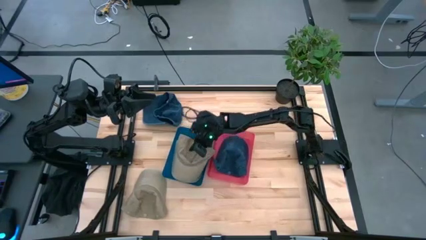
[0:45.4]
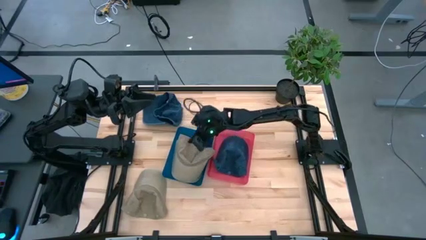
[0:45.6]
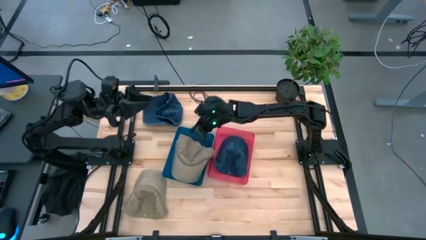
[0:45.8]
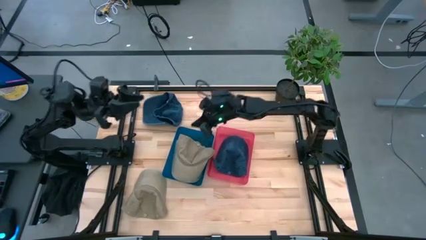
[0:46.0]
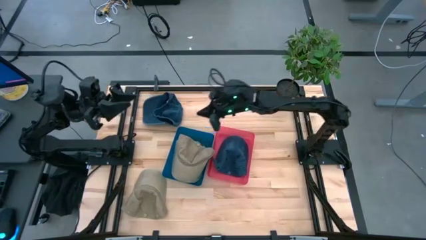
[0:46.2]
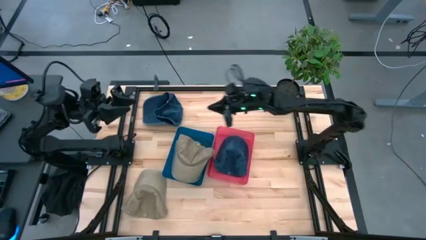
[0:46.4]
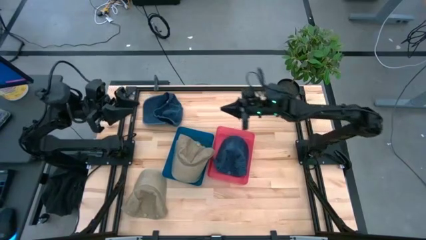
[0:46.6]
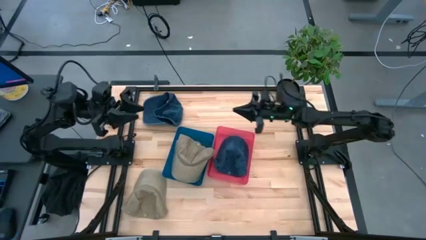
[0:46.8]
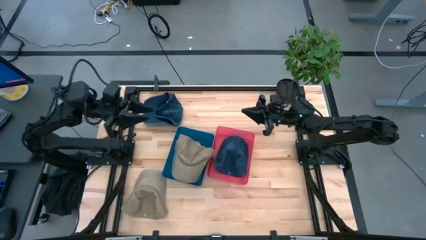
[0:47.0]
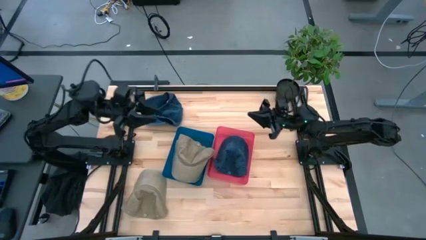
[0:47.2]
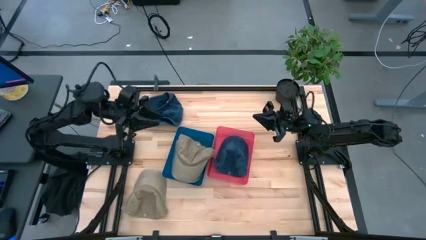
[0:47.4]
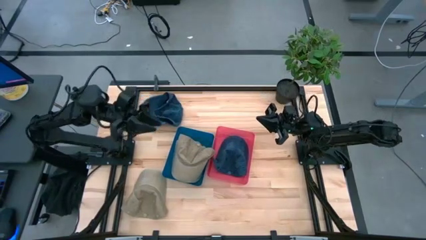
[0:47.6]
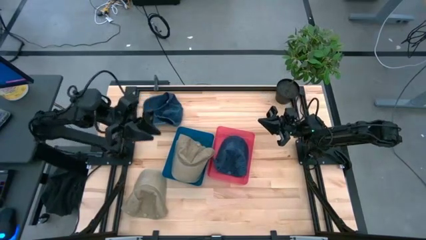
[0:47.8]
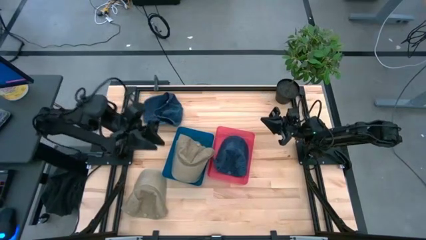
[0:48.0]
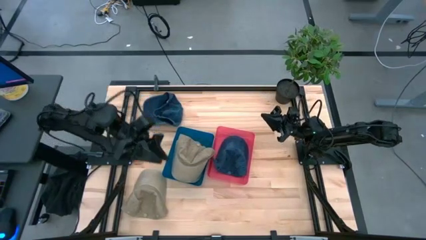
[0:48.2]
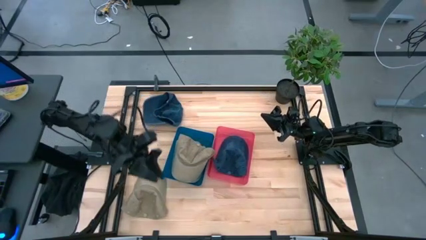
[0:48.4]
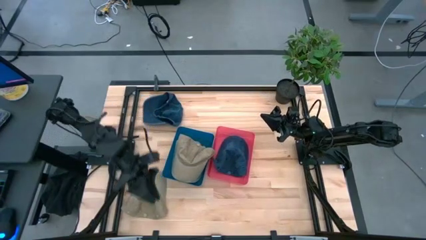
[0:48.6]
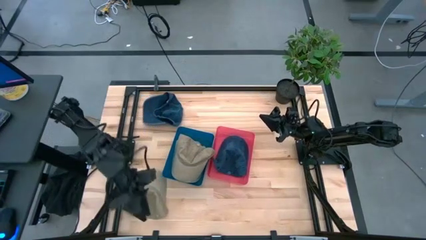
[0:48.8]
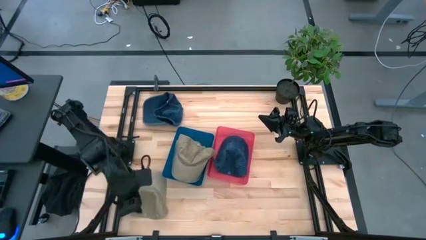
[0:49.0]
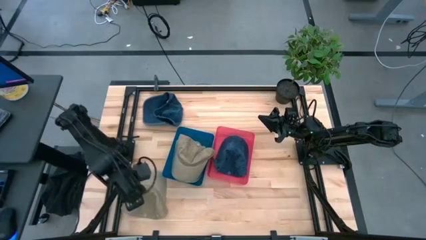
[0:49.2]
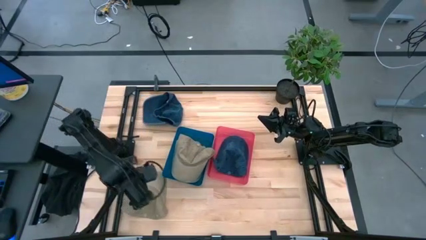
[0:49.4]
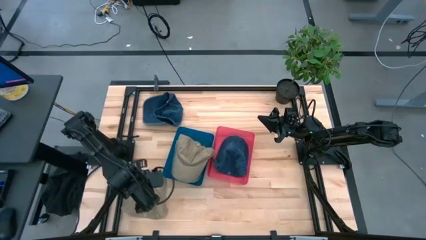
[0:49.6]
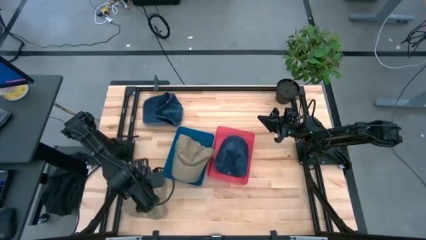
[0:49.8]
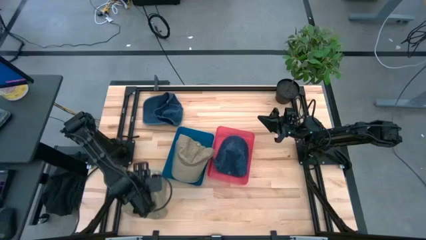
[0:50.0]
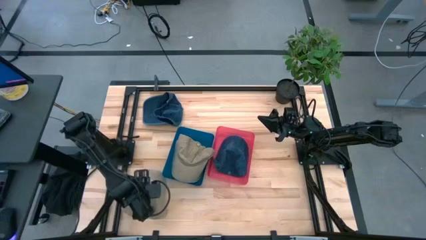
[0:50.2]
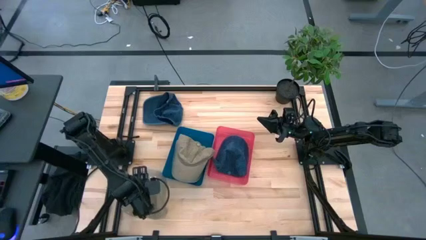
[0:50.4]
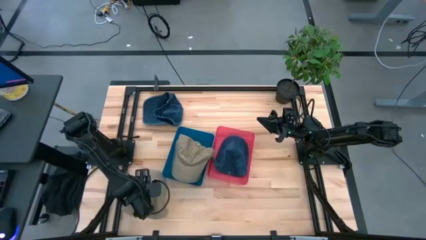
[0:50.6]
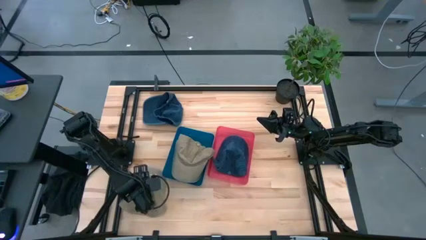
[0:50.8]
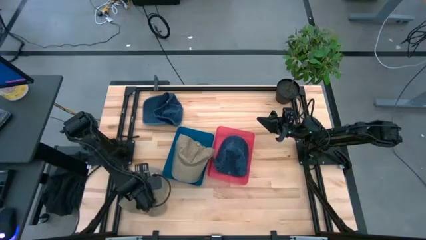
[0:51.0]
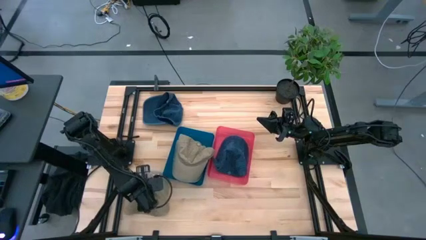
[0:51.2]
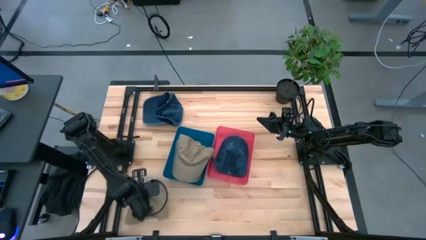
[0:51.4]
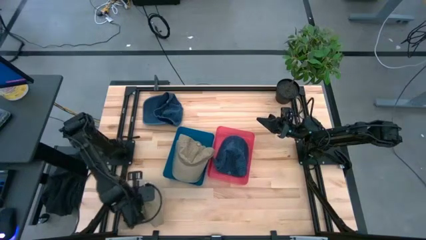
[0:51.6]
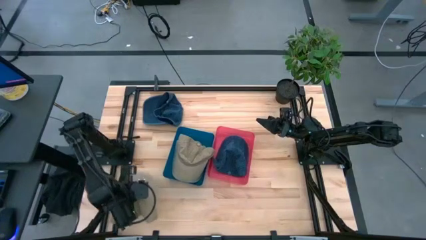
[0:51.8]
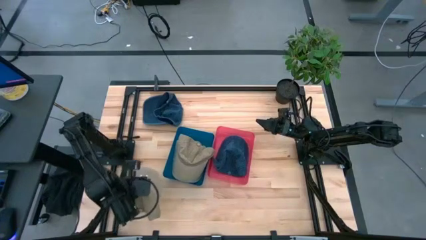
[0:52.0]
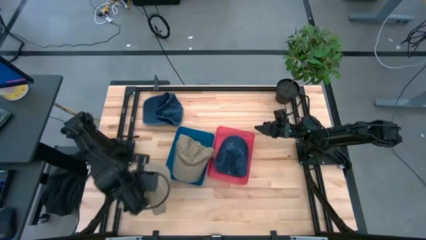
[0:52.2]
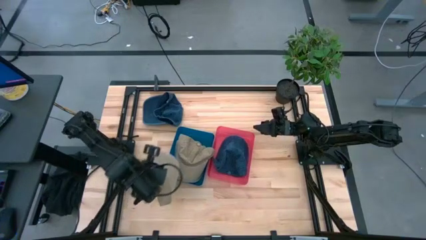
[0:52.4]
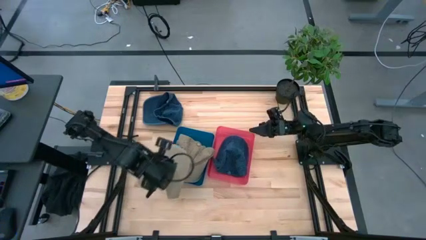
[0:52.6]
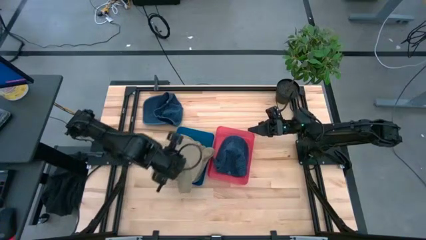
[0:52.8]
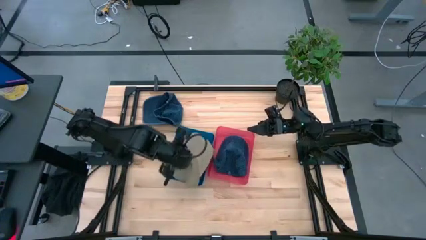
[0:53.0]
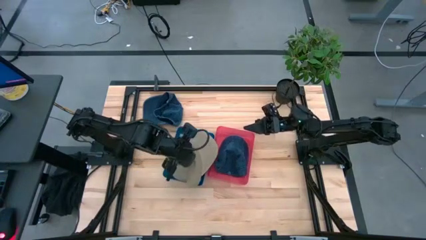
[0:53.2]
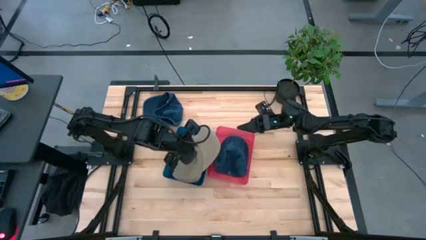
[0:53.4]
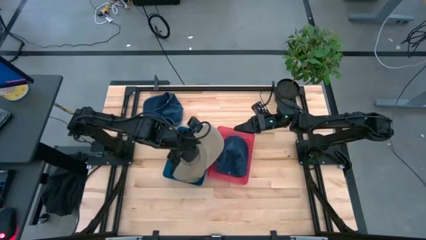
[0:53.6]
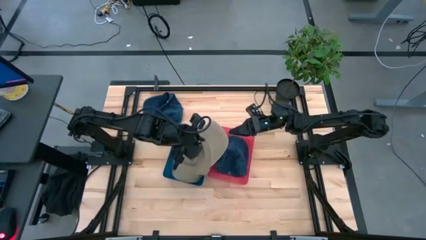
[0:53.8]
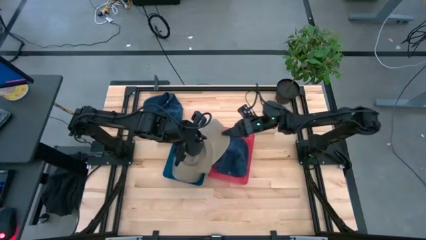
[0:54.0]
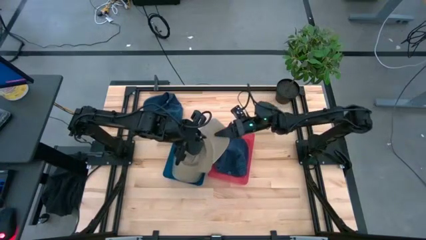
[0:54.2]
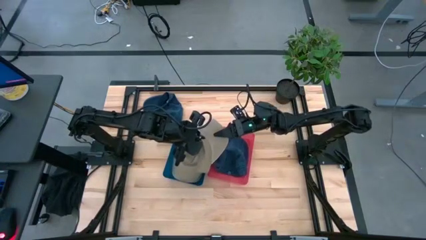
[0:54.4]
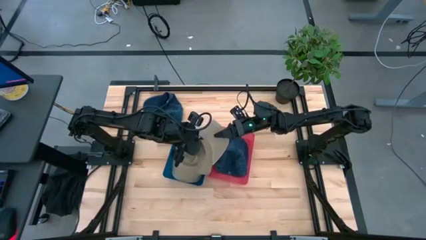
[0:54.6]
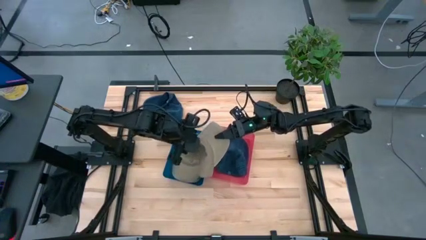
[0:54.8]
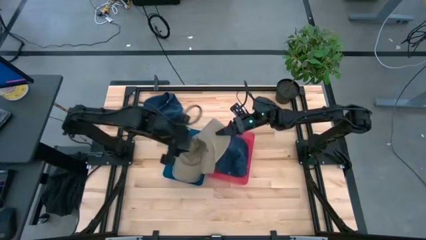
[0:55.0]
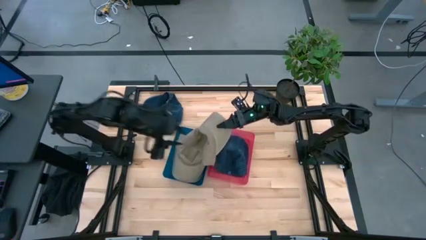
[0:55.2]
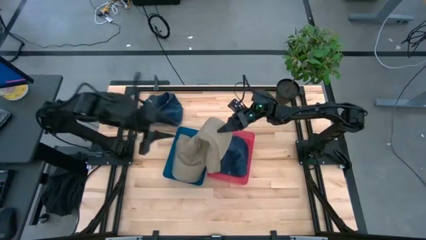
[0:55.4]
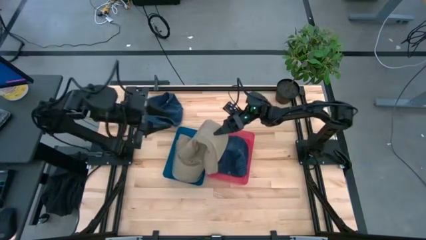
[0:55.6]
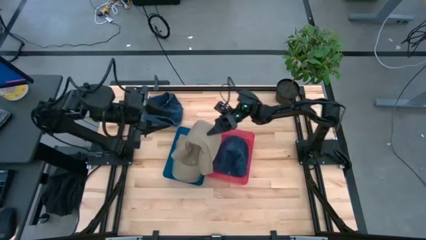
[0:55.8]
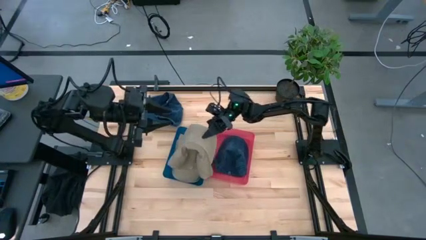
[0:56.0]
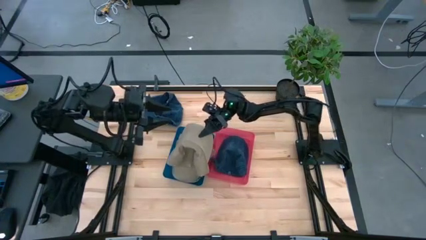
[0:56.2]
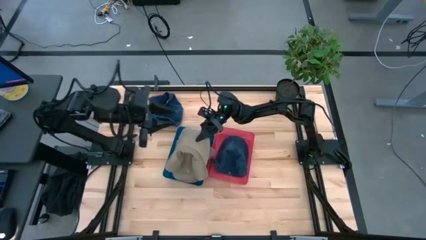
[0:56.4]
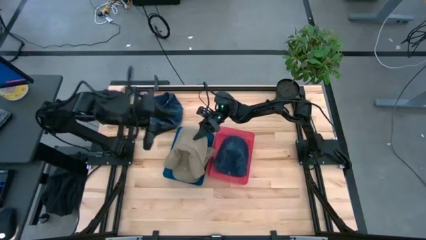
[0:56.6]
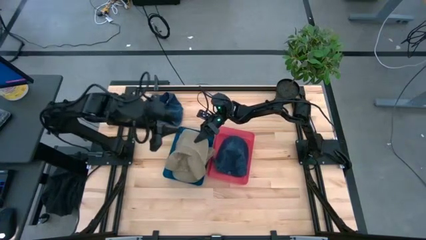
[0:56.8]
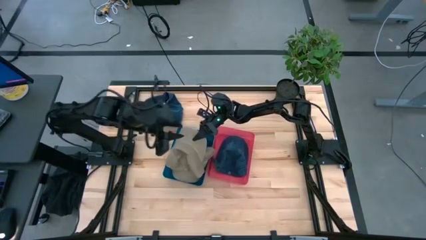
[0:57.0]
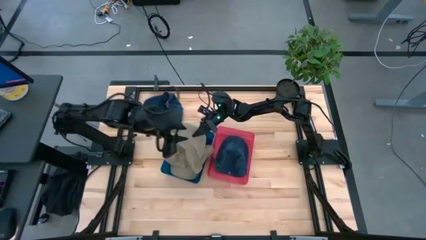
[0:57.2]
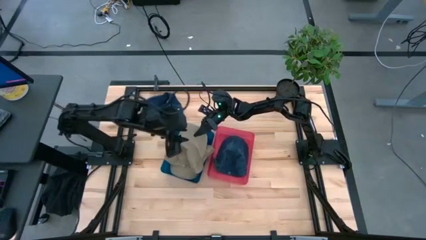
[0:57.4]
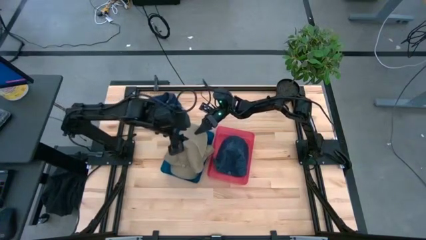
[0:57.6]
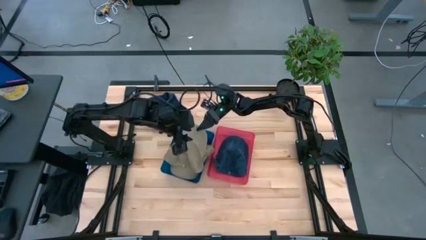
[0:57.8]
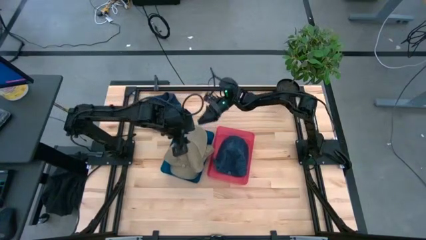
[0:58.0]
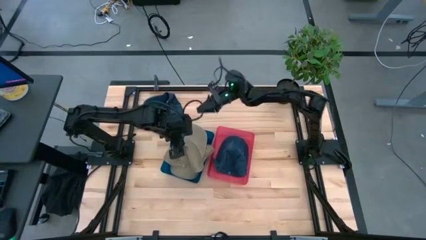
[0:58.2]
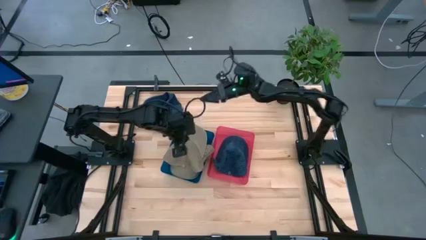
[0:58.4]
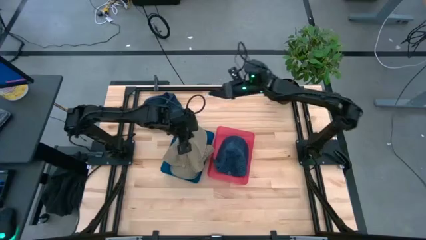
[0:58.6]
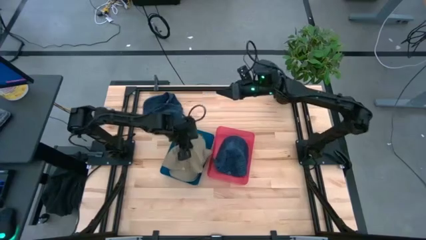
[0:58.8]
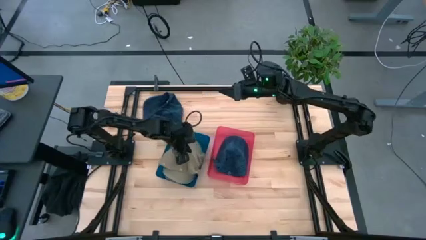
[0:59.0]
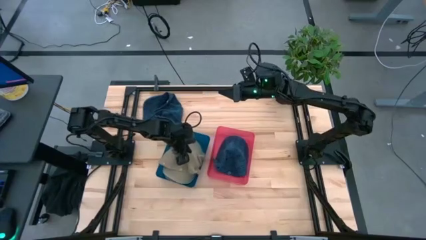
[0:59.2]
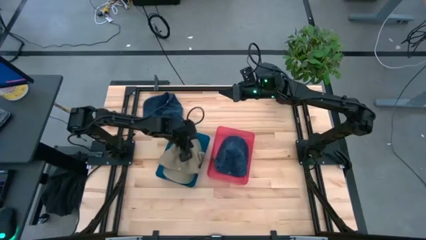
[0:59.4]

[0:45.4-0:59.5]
Task: Pick & Place hat
Put the brown cap into the blue bin
